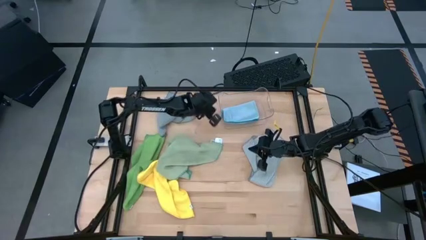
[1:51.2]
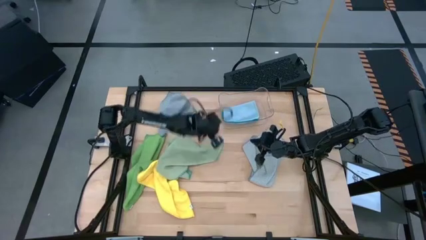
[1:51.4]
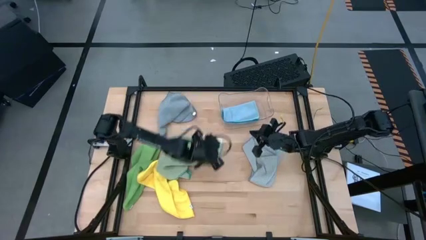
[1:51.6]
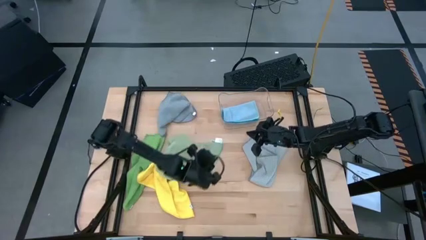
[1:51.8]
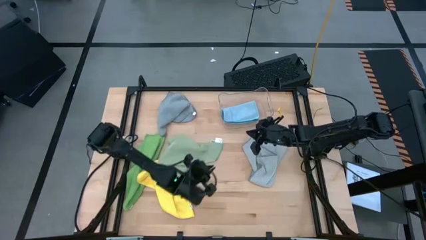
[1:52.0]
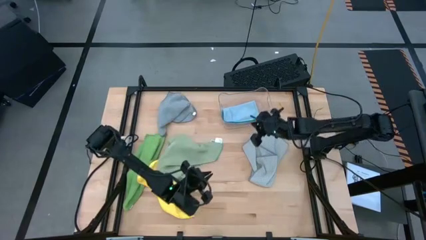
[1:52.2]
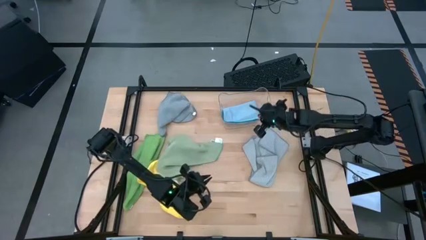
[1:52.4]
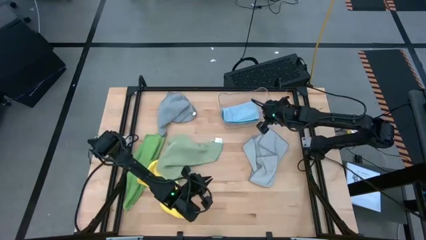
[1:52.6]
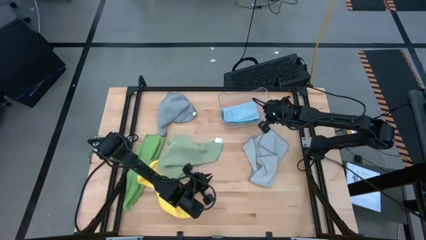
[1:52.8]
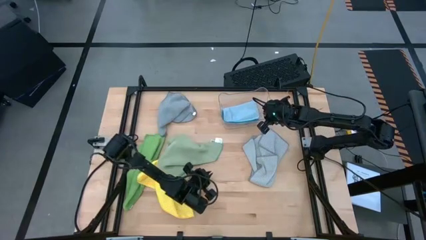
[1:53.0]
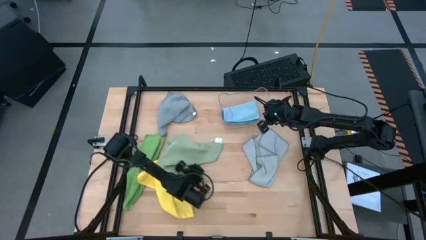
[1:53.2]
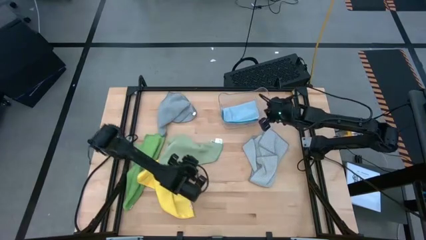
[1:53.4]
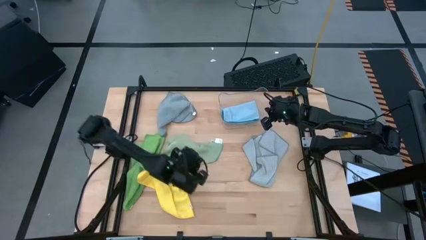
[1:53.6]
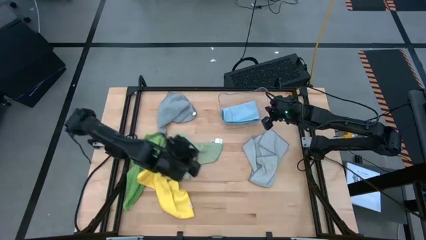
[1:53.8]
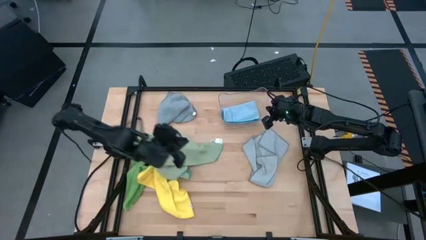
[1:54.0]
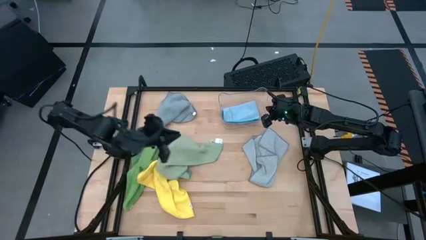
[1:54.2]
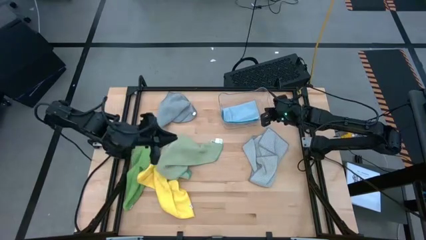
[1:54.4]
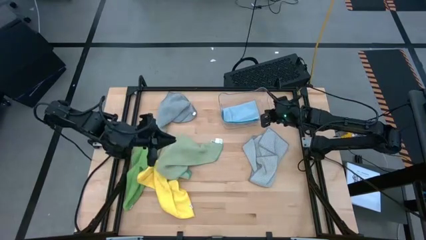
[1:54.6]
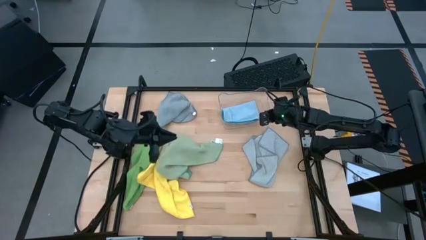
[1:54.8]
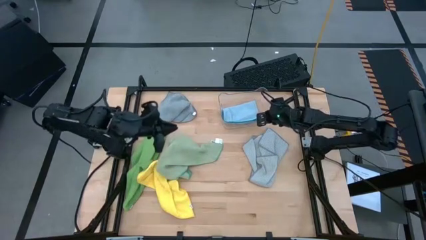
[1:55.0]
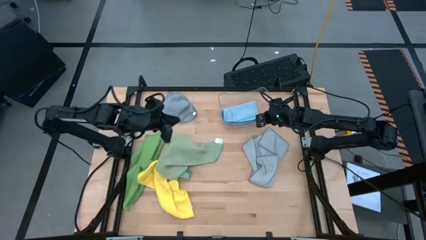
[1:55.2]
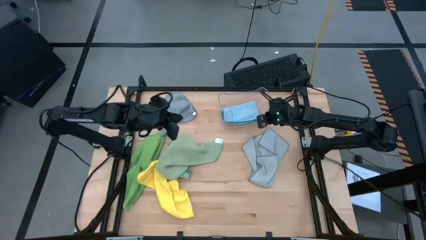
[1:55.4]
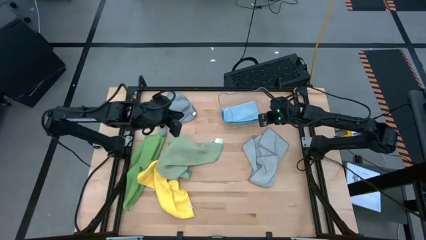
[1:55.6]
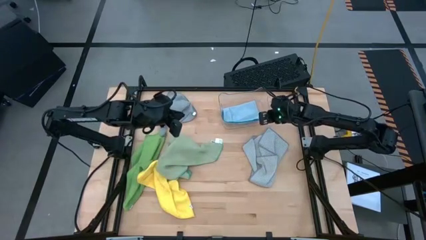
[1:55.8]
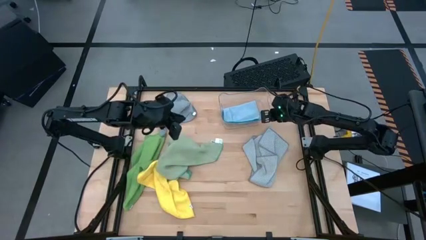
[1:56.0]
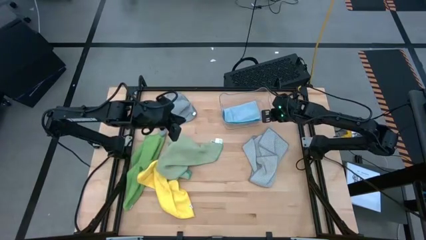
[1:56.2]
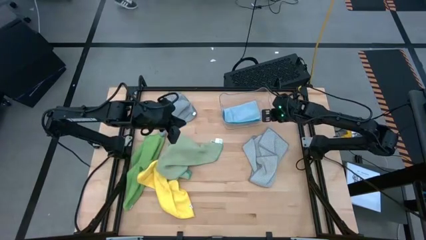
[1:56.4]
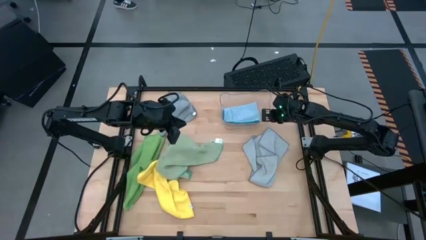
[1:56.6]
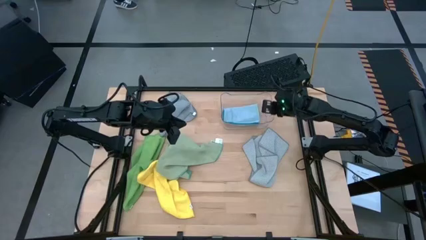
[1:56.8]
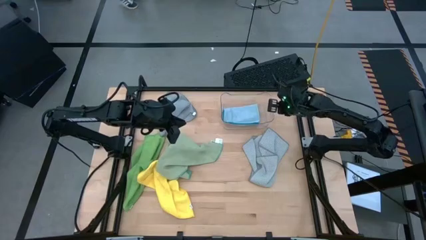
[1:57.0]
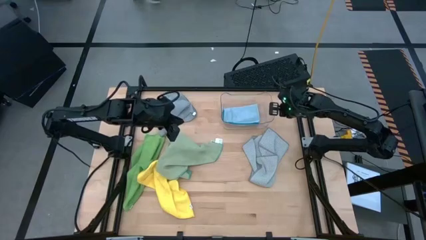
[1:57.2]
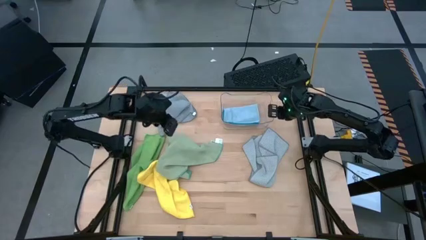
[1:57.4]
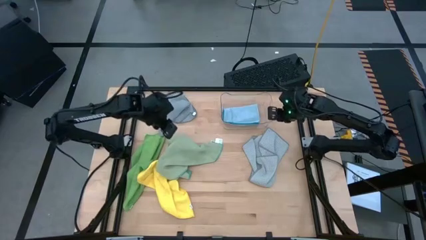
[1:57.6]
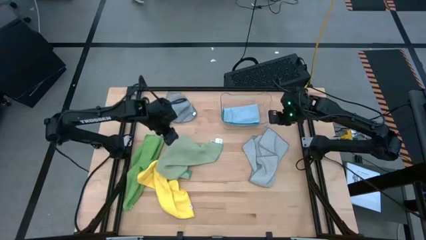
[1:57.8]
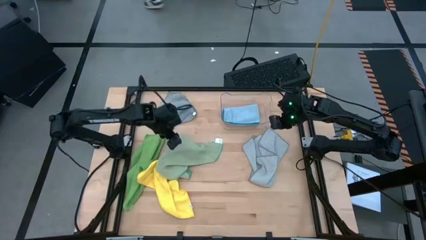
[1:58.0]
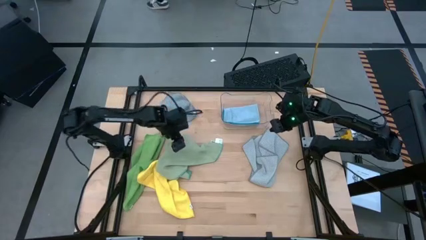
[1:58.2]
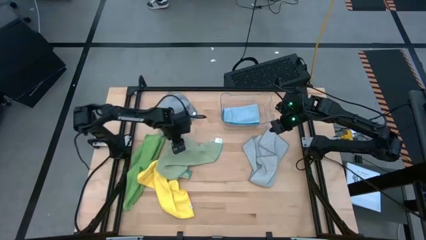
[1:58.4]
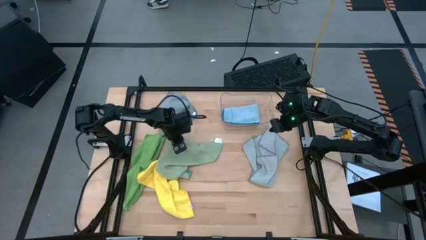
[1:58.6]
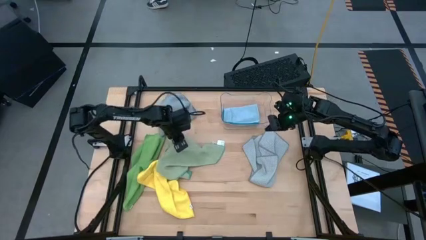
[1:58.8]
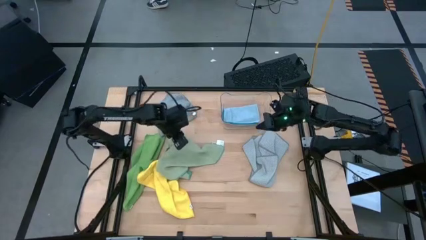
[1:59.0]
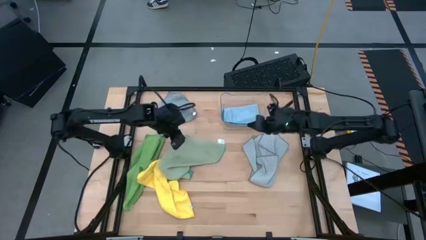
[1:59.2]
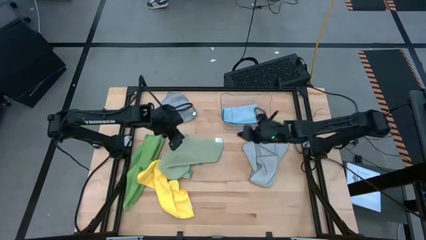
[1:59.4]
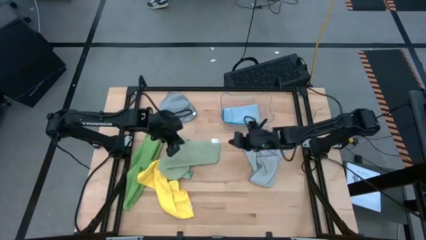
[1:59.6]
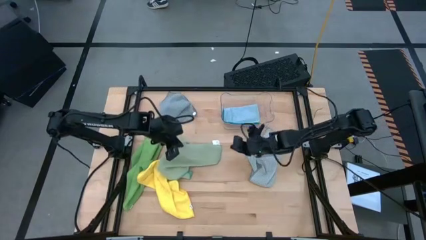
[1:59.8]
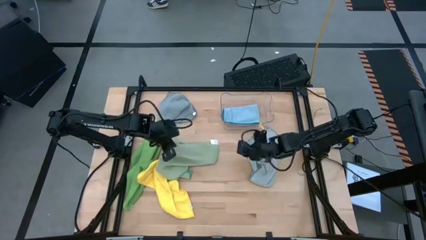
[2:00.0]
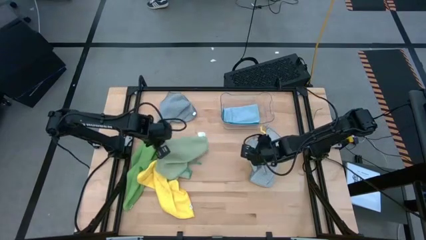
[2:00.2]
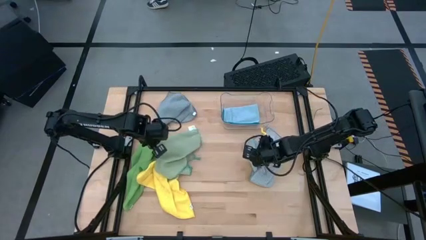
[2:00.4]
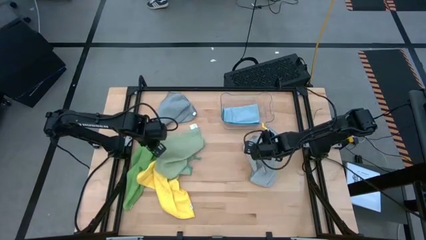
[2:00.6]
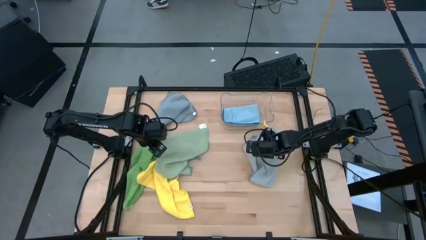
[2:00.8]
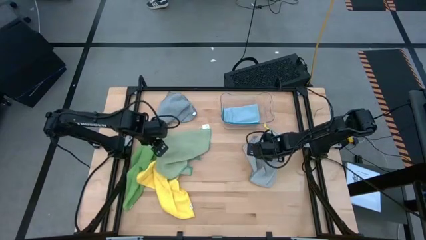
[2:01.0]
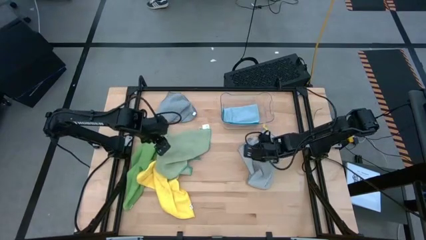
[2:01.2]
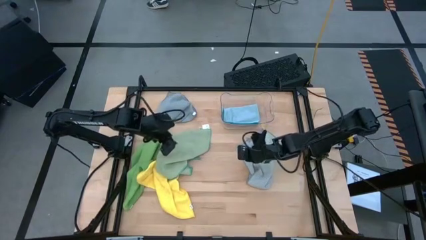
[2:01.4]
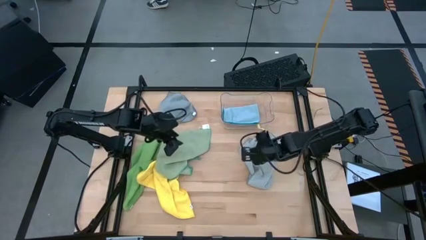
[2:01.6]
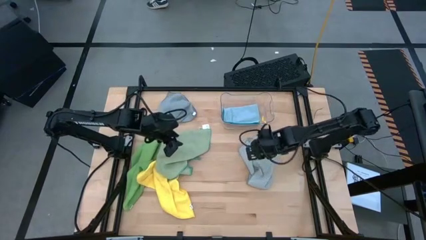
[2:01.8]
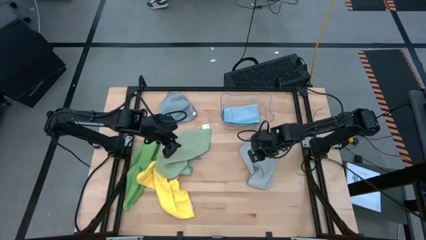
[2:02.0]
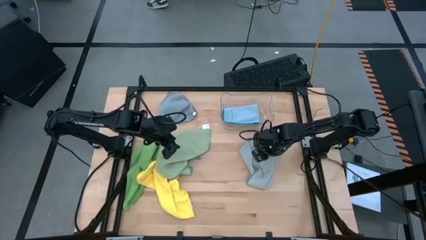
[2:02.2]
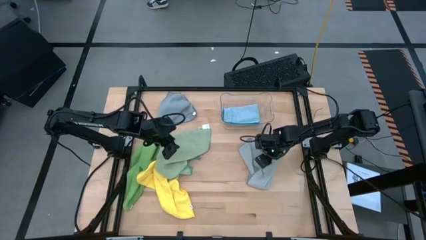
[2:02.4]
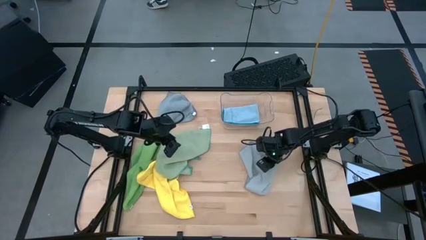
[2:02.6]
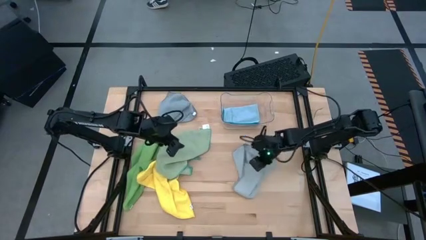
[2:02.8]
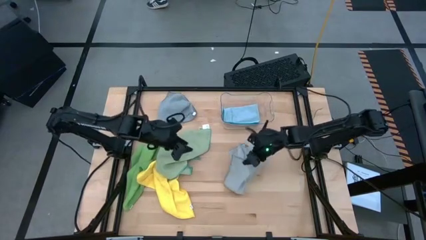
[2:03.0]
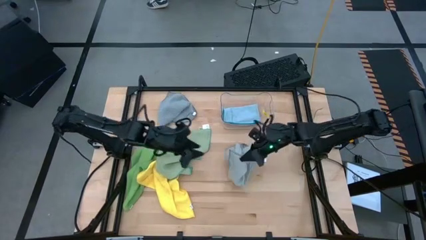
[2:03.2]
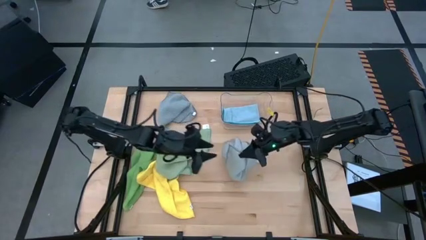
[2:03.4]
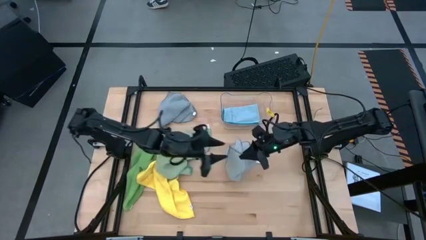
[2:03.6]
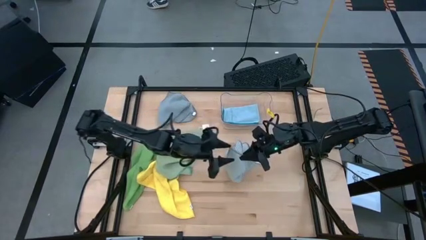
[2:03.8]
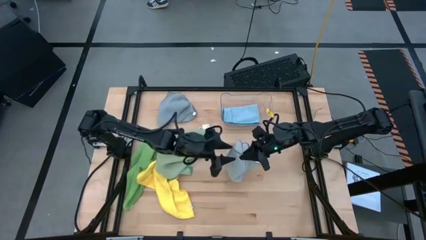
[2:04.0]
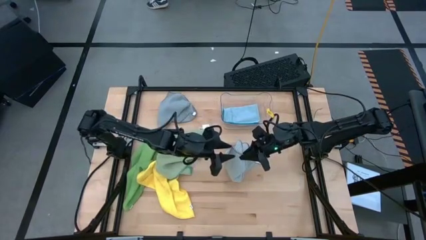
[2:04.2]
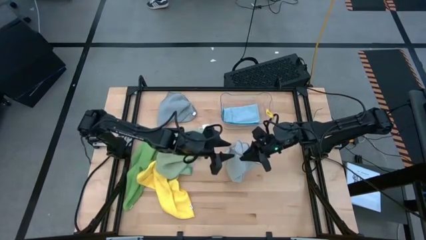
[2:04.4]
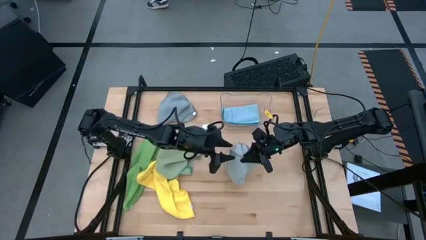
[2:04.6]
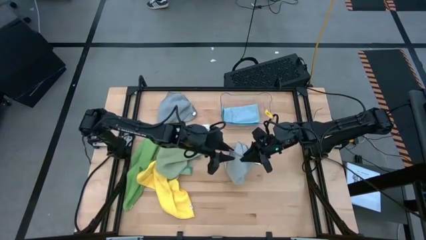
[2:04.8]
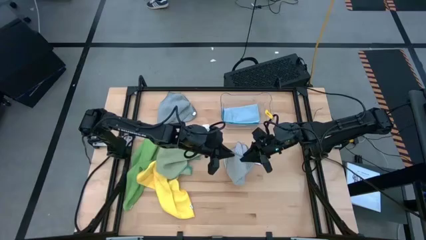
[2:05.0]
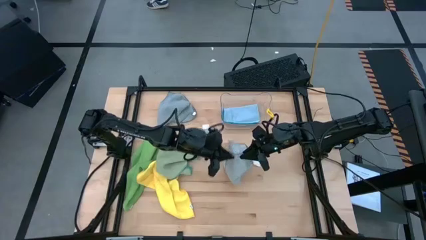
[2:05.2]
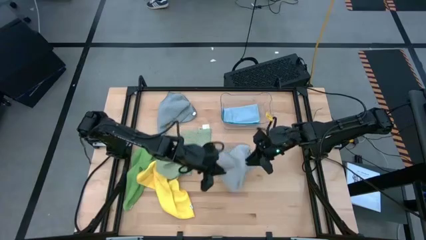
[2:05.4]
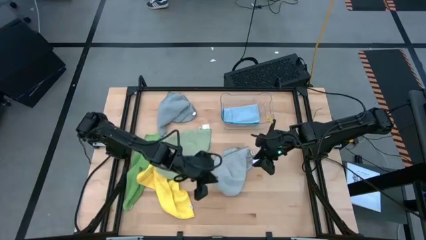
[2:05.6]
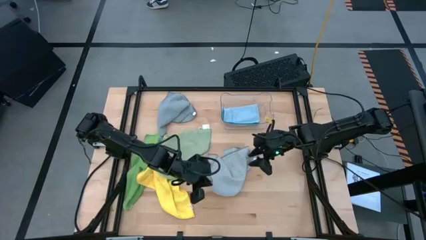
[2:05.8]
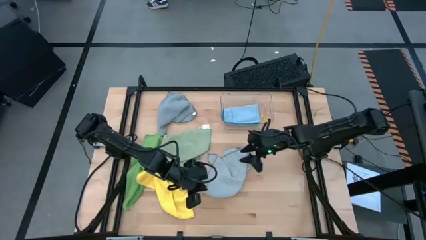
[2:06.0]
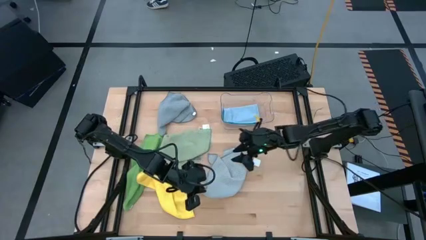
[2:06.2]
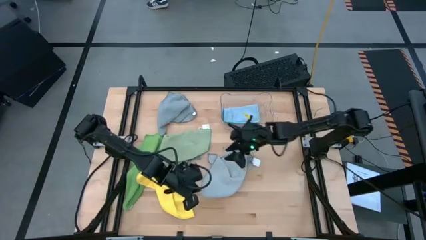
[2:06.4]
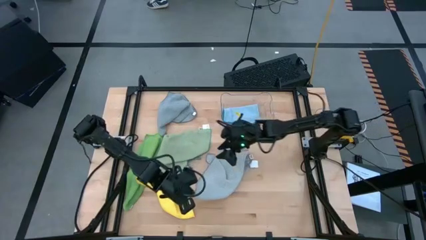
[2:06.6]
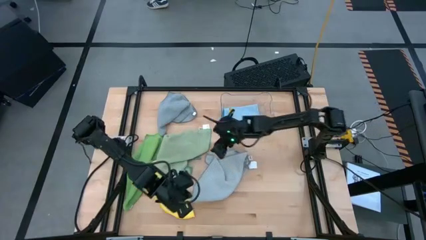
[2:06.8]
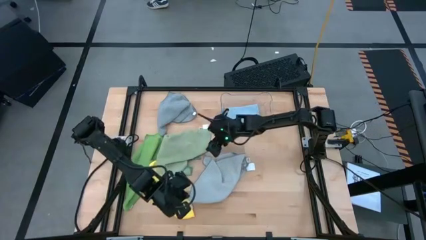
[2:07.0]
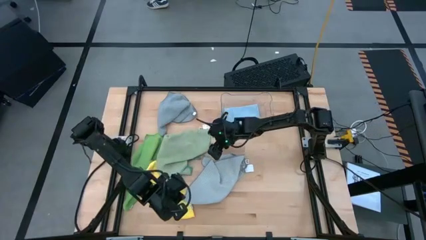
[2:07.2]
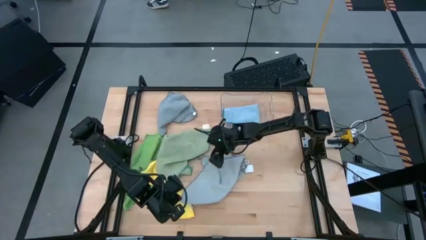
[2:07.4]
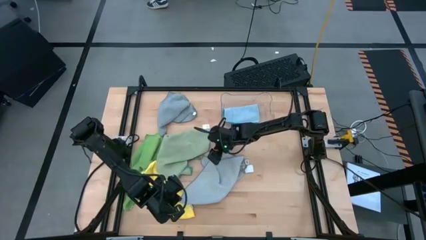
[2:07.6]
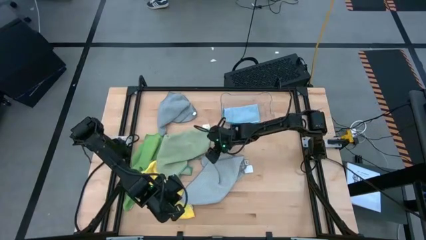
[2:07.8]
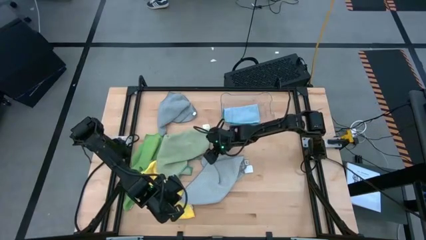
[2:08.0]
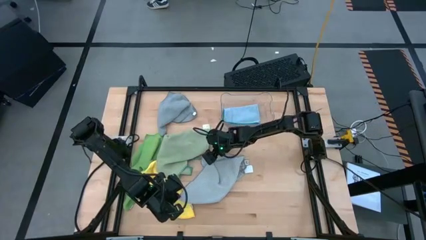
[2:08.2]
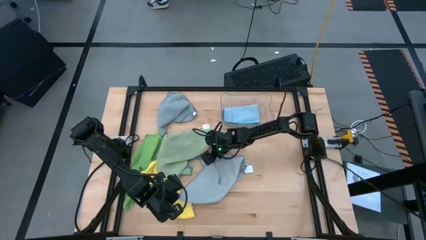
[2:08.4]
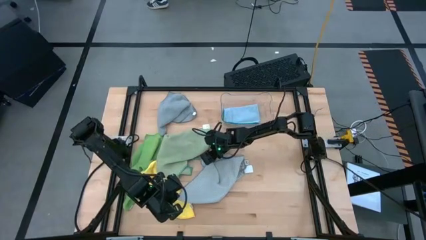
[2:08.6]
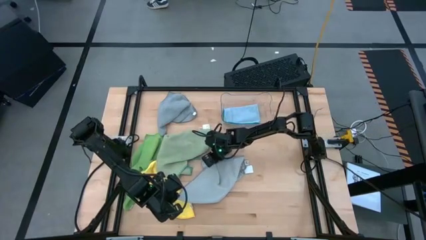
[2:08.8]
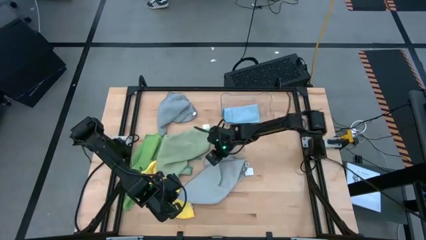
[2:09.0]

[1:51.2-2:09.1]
Task: Fold microfiber towels
Fold the light gray towel
